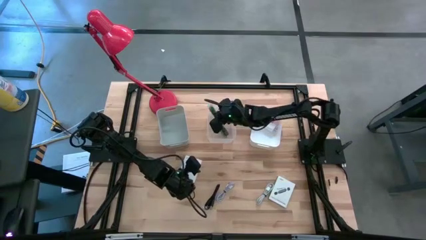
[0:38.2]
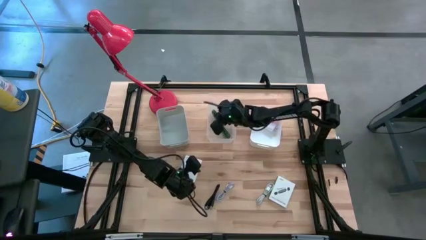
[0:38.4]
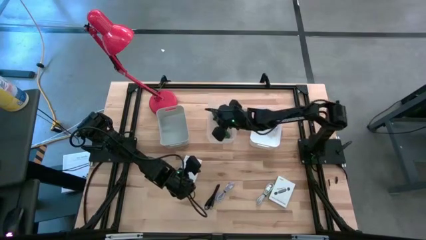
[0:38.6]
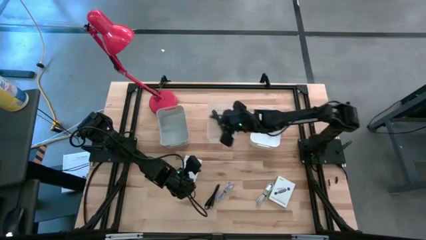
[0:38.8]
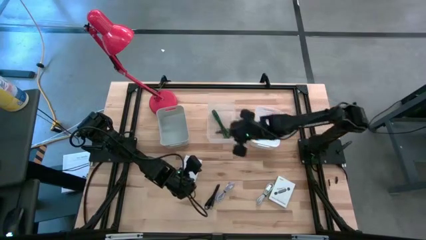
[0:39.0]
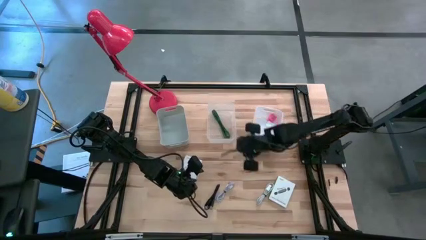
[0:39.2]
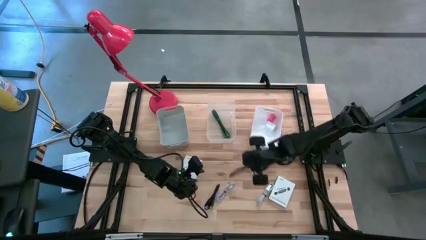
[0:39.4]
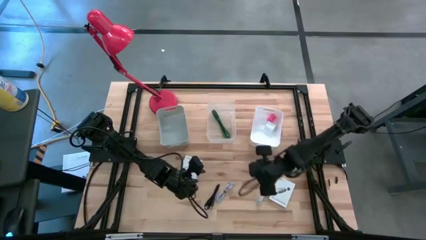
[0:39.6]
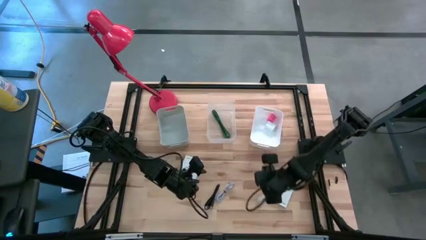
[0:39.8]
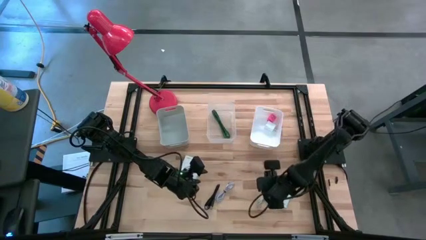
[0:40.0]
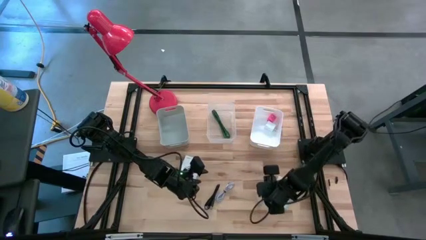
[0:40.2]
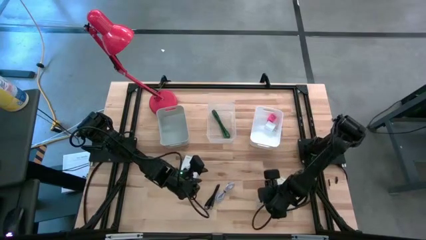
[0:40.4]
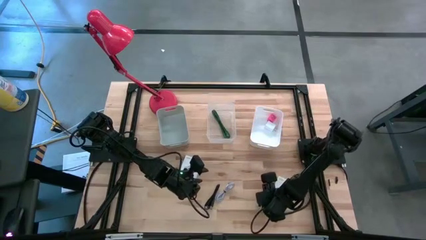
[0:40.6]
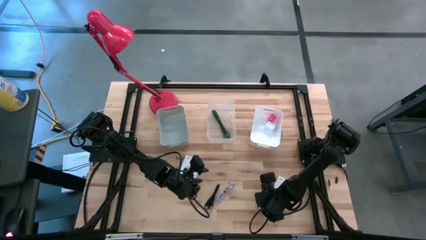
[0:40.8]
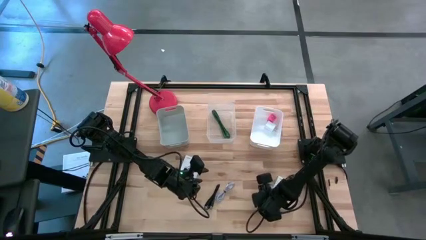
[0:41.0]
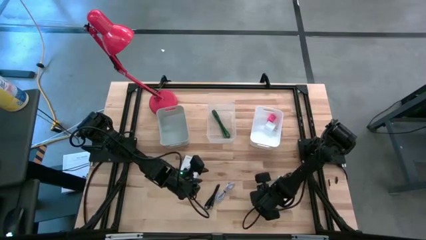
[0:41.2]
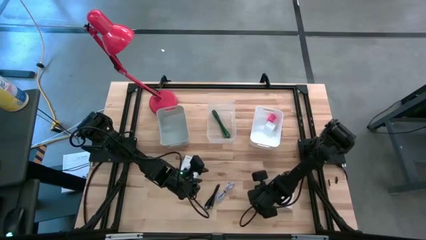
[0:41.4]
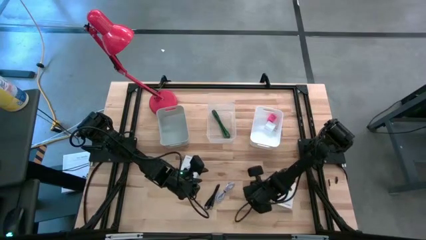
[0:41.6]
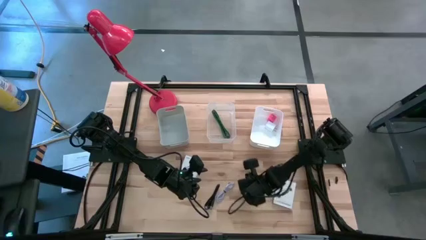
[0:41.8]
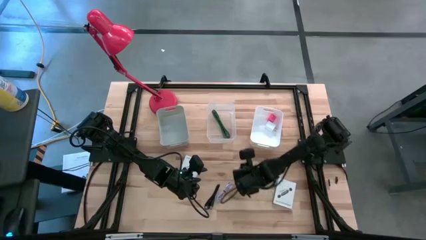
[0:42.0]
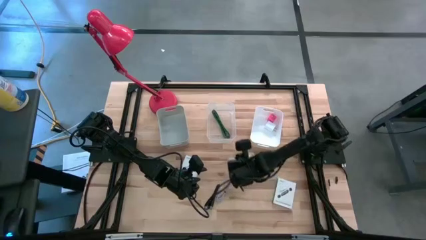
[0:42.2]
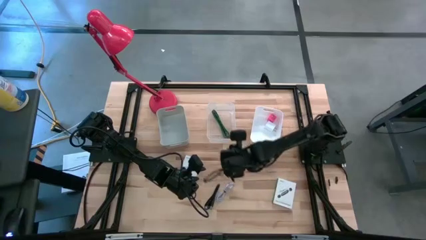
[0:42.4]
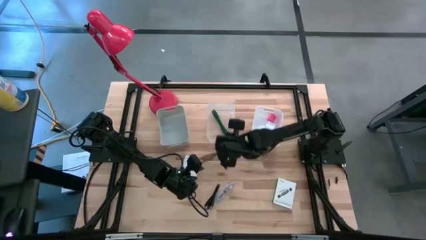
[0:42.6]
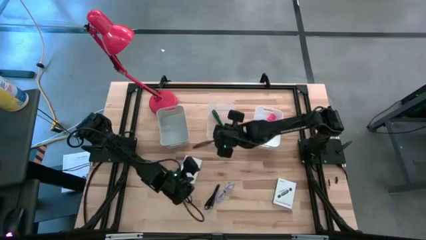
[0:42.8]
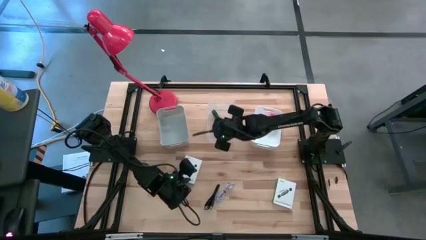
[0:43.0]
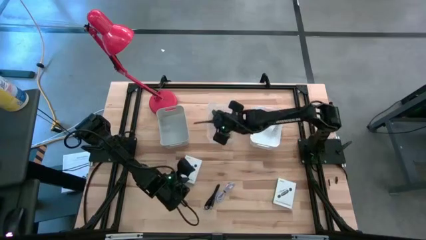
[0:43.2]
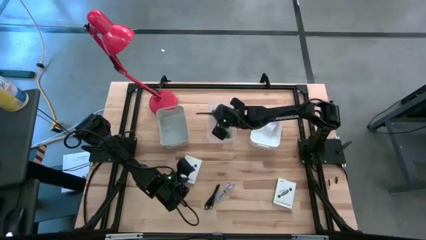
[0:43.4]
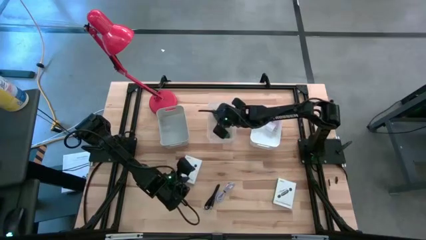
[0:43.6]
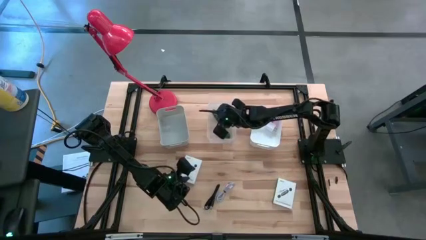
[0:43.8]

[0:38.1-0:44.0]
Task: Pick and place items into bin
Put the right white USB cable into the transparent bin

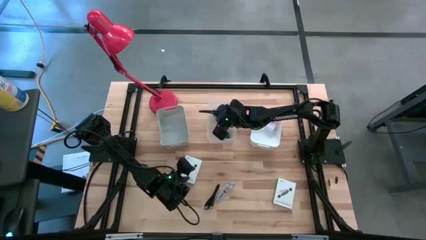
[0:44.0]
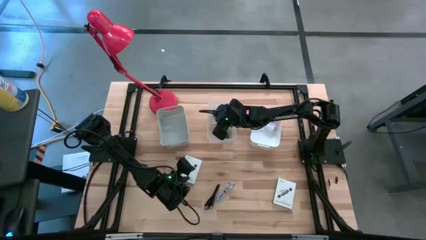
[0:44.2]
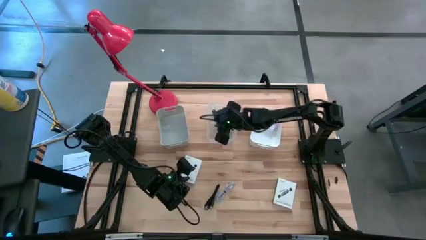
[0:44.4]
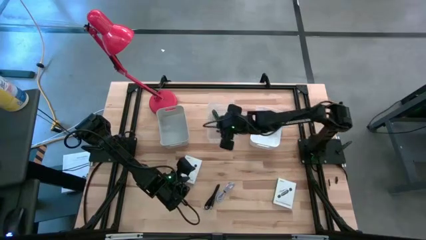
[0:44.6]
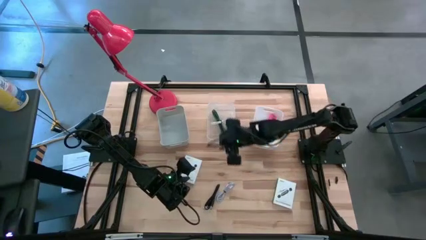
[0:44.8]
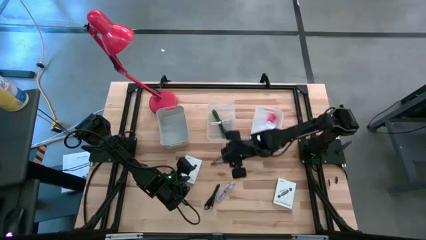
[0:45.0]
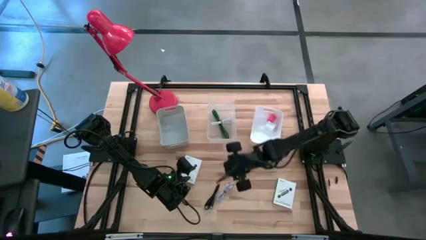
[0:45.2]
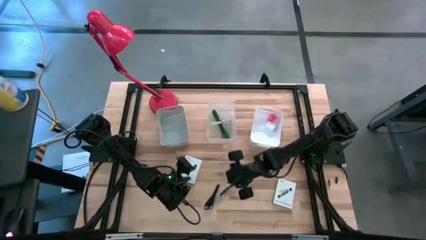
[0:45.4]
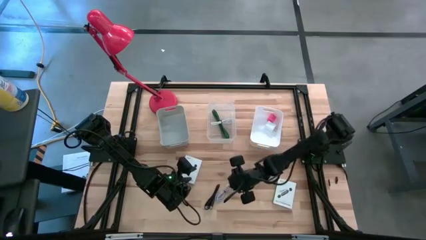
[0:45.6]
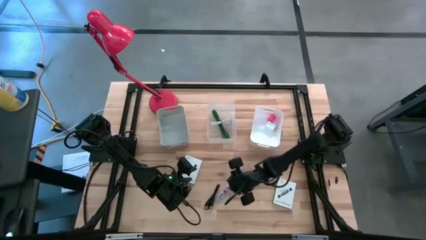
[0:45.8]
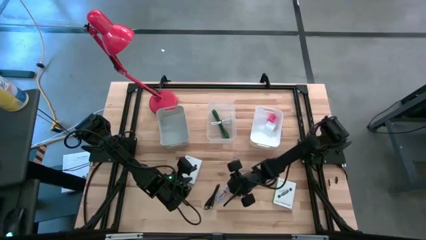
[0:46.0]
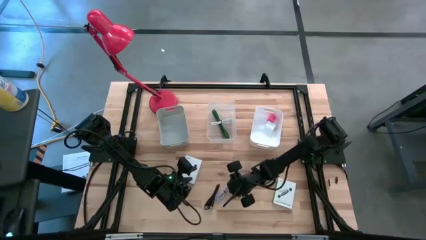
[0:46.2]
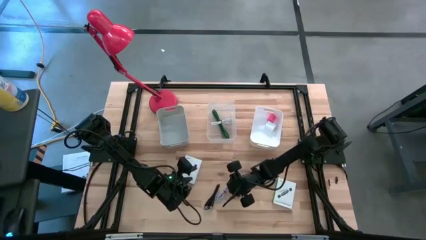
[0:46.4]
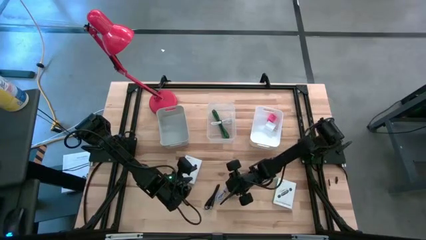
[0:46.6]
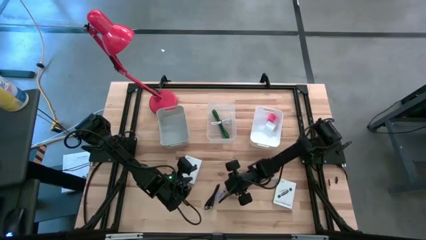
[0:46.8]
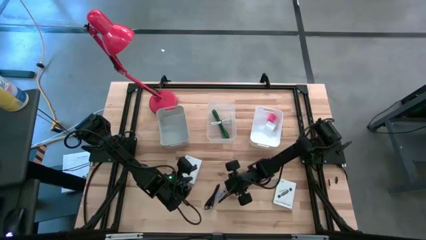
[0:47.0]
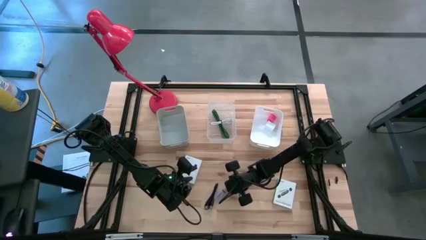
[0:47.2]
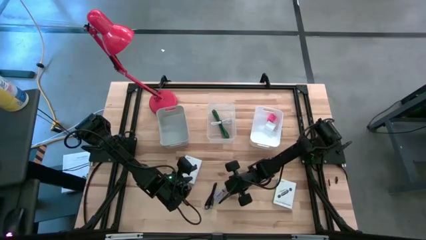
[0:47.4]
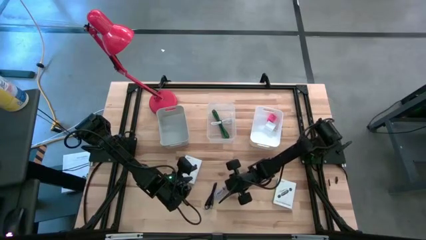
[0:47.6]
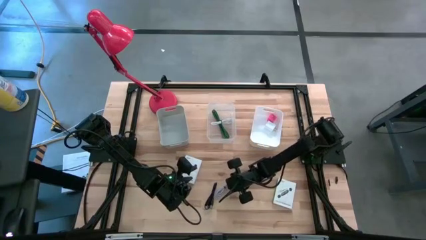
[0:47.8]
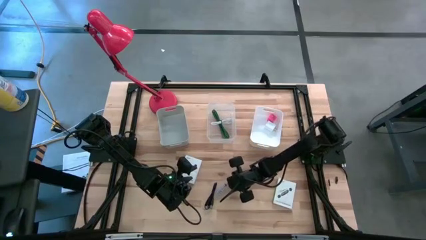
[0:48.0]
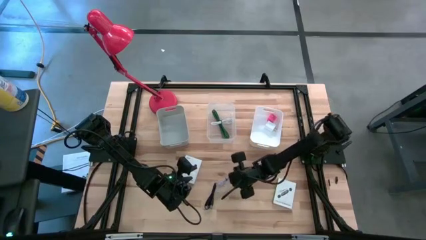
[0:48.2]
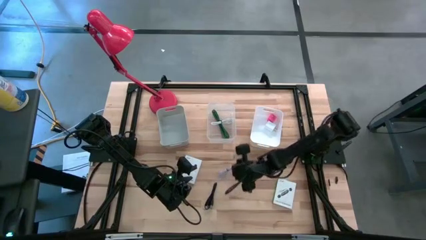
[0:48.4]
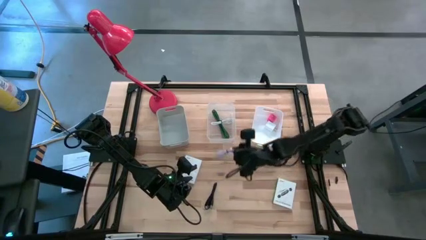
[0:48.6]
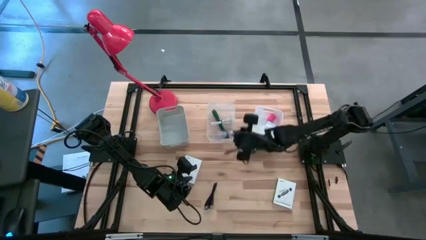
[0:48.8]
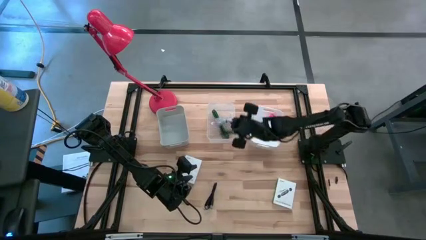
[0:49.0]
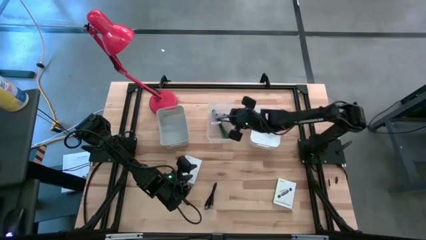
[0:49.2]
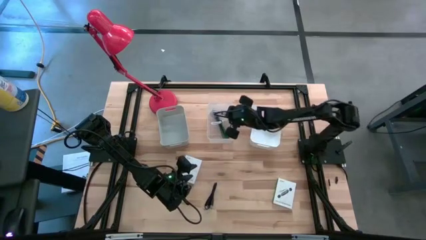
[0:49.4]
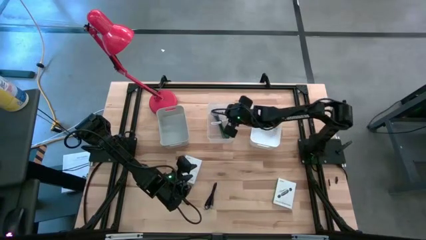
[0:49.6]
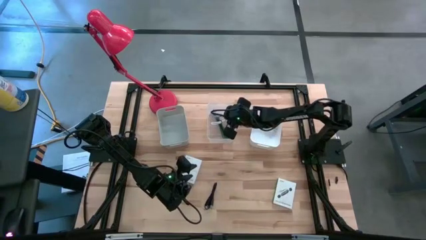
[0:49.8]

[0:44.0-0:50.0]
Put the white USB cable into the transparent bin

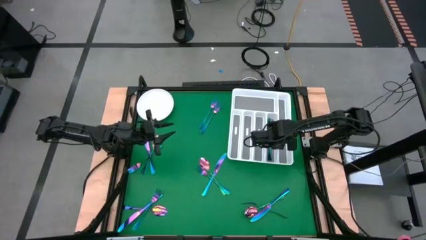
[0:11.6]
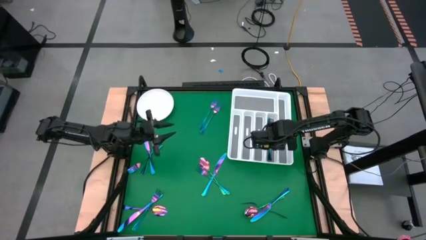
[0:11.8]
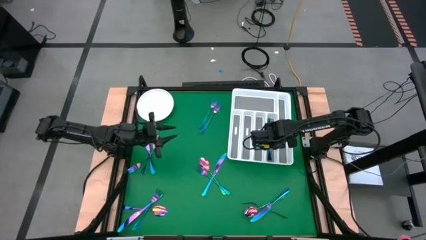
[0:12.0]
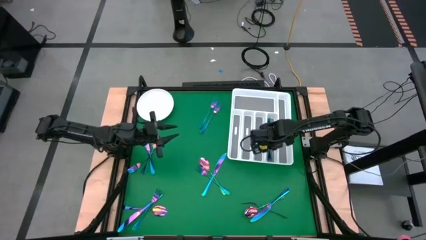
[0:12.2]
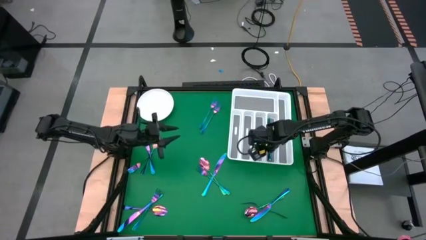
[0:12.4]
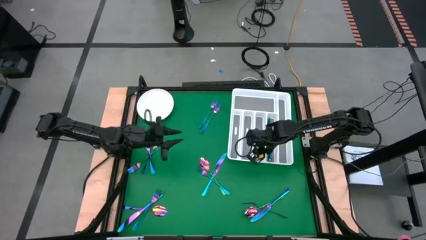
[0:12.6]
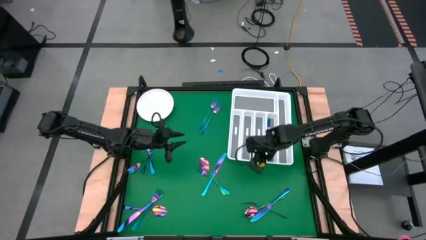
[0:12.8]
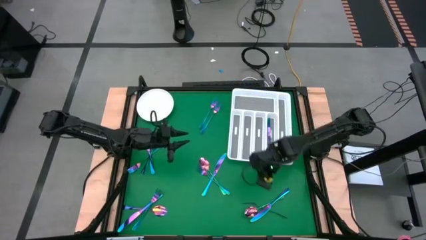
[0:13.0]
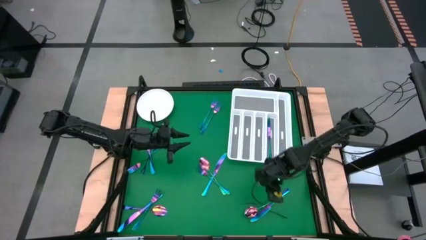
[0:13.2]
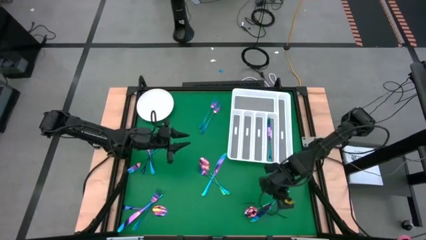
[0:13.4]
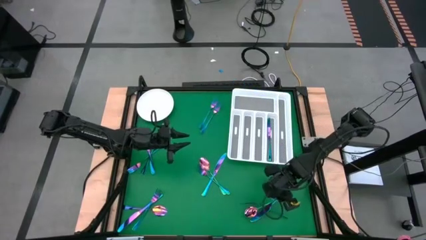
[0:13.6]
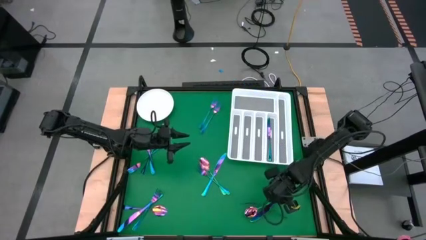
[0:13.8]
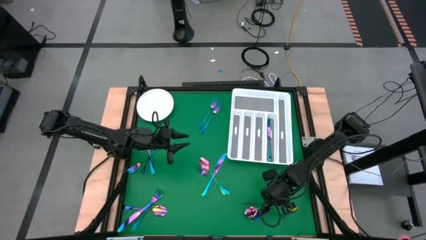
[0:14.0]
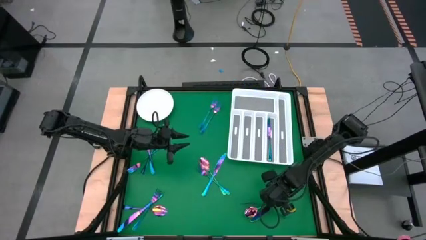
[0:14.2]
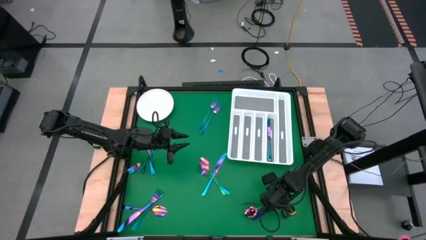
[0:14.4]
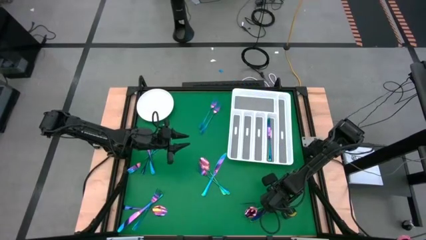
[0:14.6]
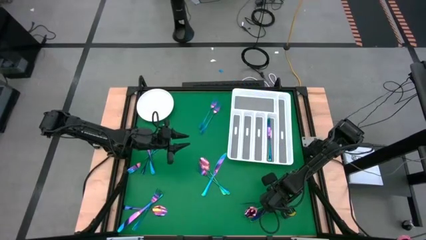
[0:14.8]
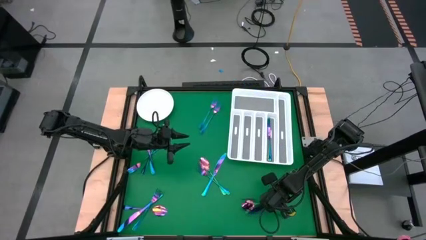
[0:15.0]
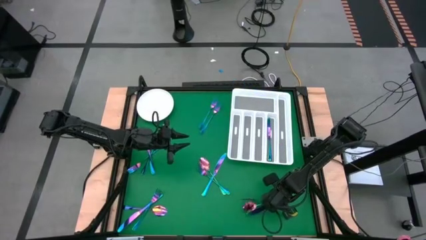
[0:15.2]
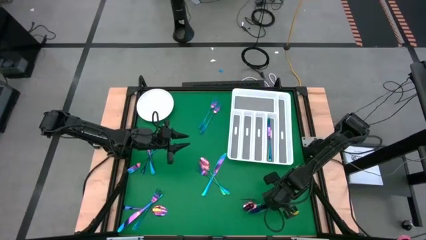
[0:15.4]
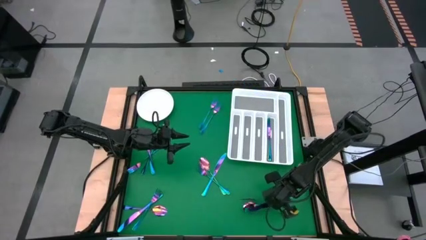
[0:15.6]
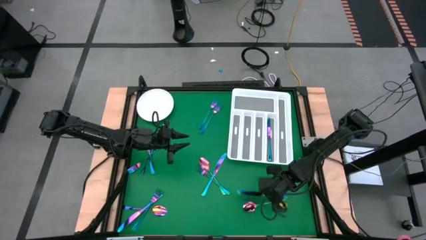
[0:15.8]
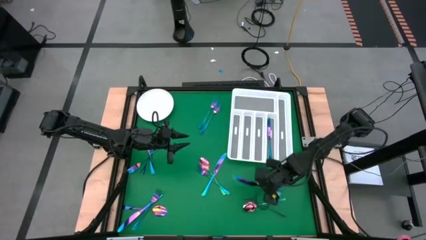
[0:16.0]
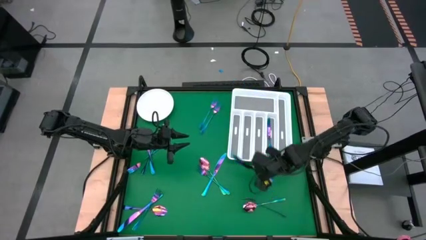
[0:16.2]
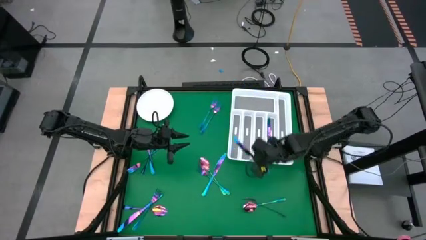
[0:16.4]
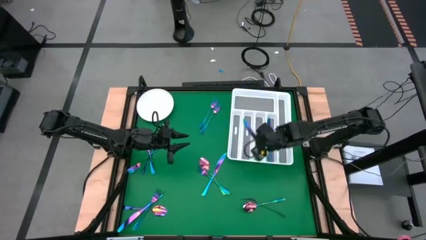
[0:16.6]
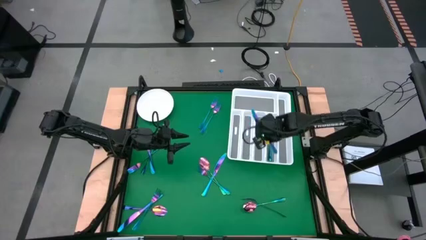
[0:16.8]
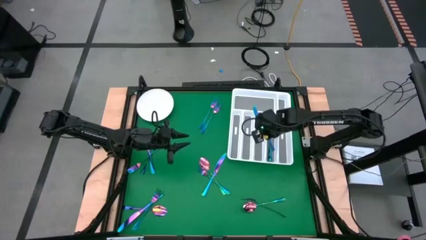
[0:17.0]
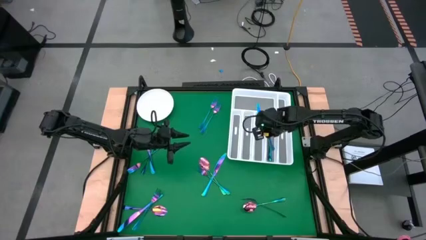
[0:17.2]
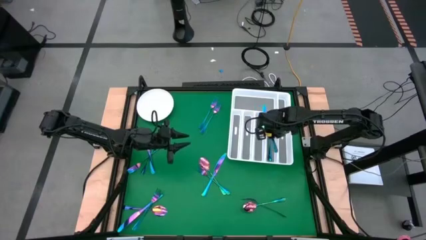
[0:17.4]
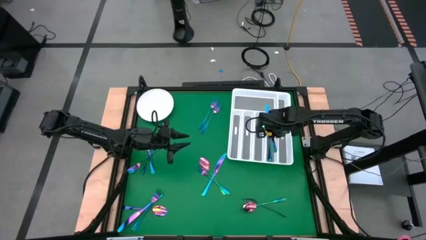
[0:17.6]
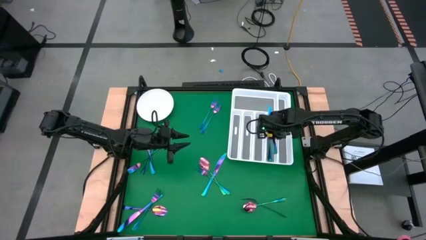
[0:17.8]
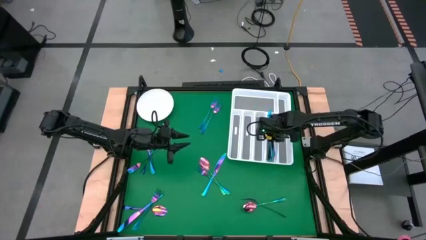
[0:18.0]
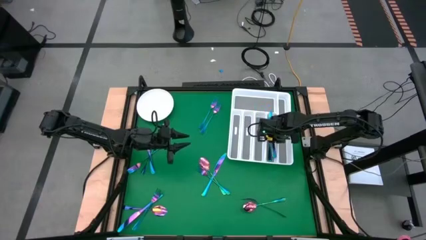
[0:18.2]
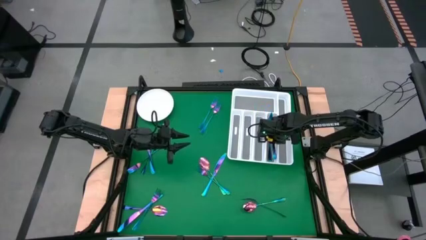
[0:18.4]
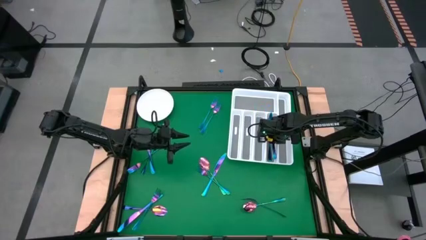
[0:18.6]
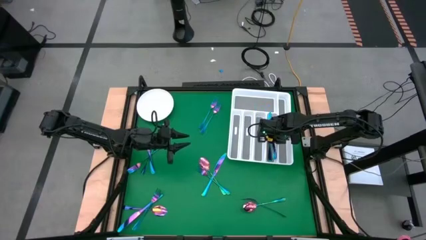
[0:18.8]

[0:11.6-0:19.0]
Task: Sort silverware
Put the blue knife into the white cutlery tray
